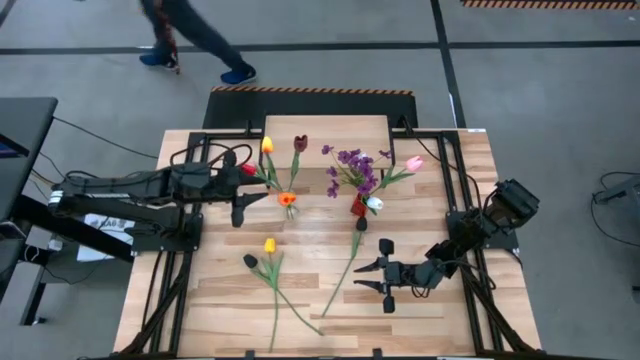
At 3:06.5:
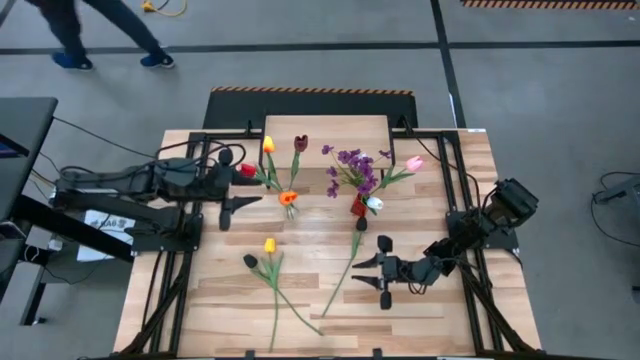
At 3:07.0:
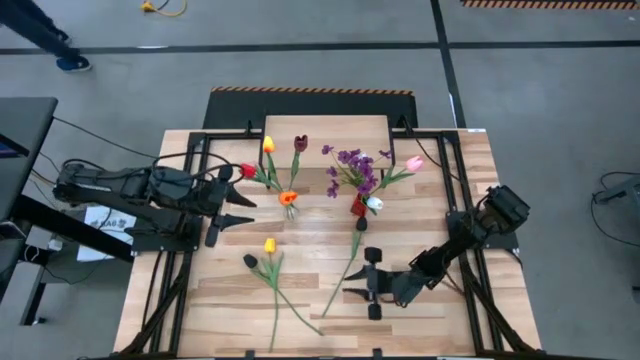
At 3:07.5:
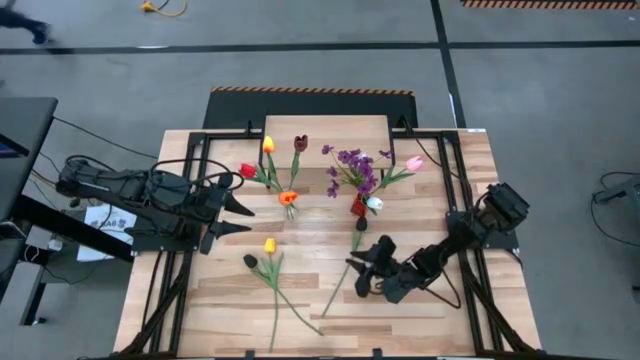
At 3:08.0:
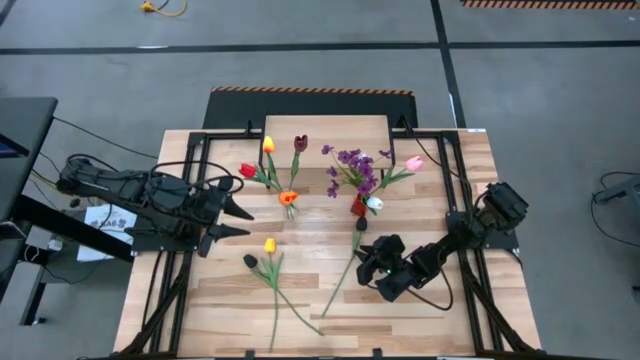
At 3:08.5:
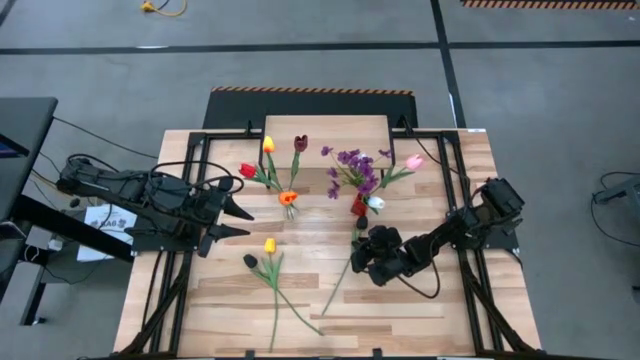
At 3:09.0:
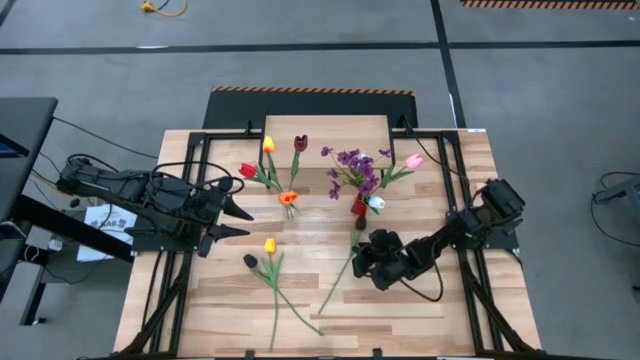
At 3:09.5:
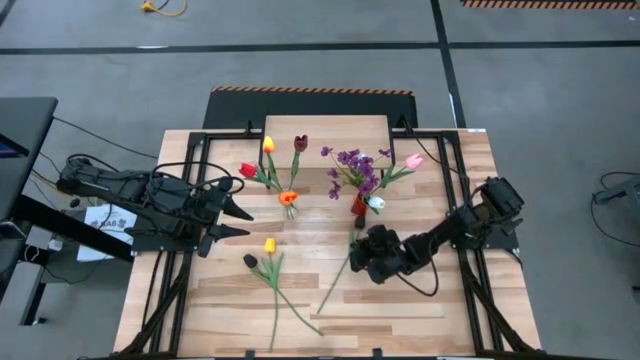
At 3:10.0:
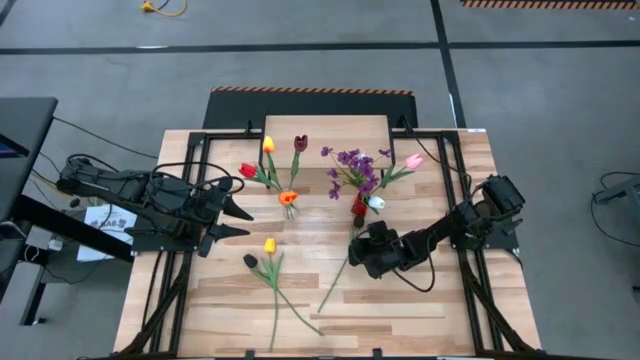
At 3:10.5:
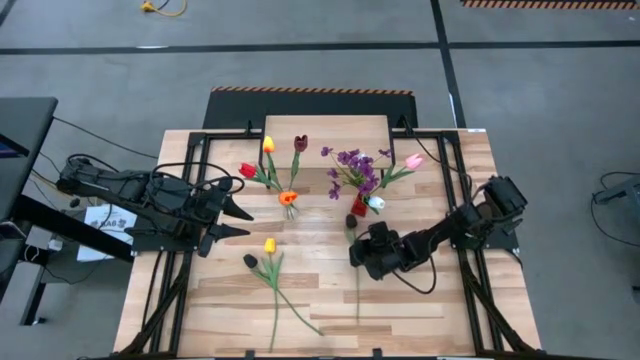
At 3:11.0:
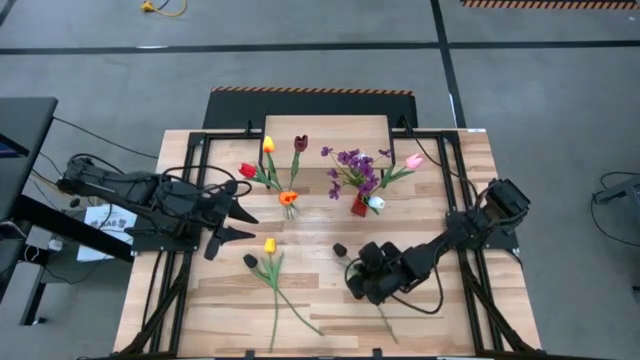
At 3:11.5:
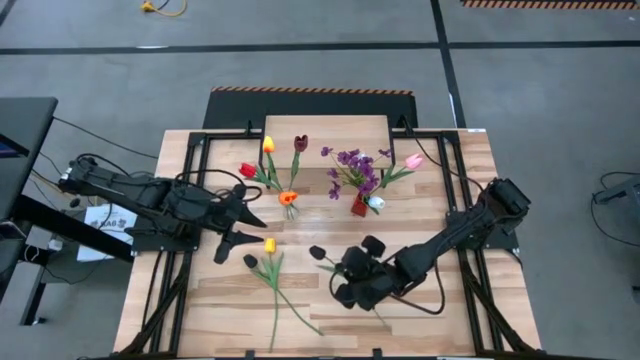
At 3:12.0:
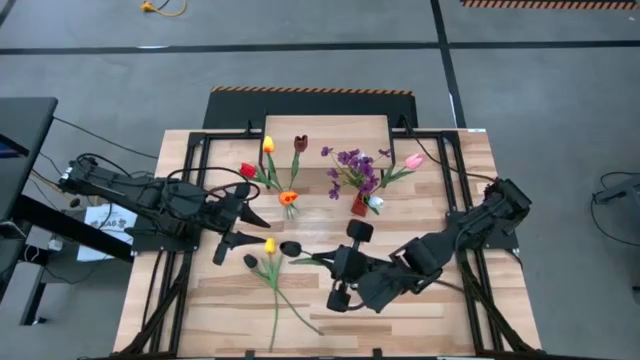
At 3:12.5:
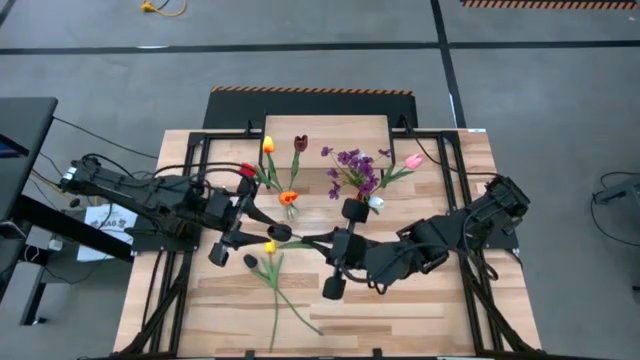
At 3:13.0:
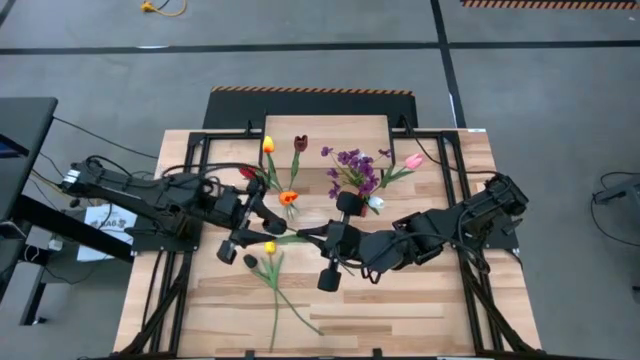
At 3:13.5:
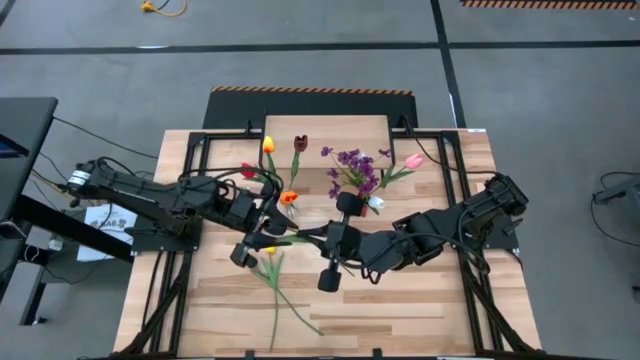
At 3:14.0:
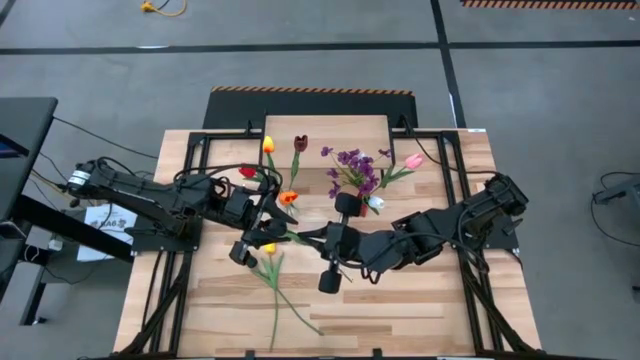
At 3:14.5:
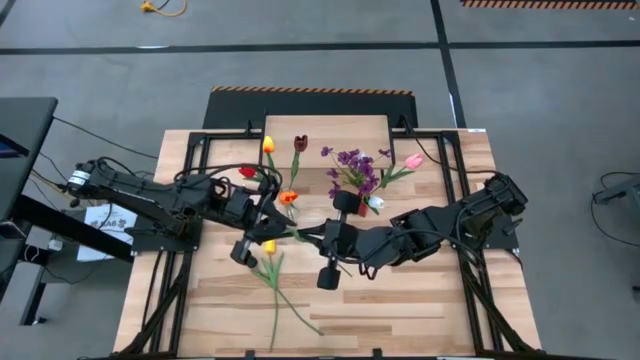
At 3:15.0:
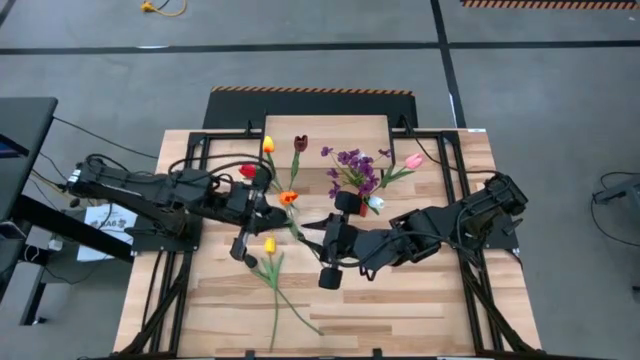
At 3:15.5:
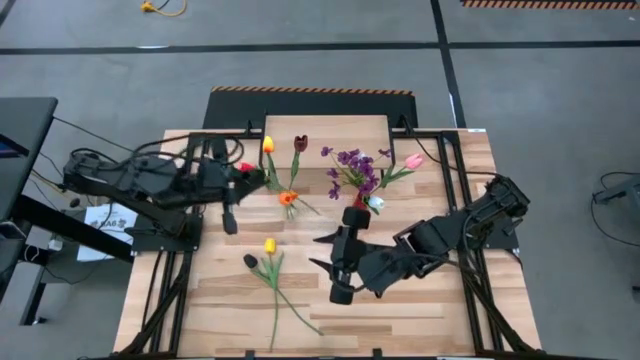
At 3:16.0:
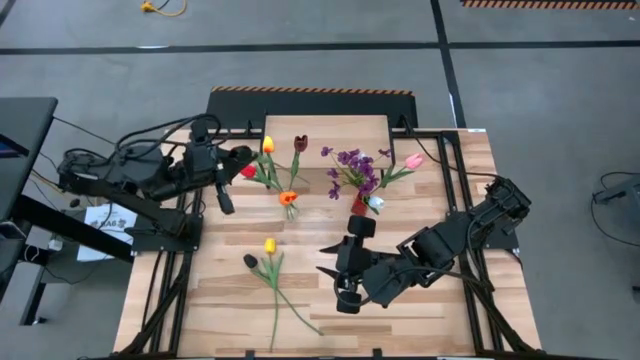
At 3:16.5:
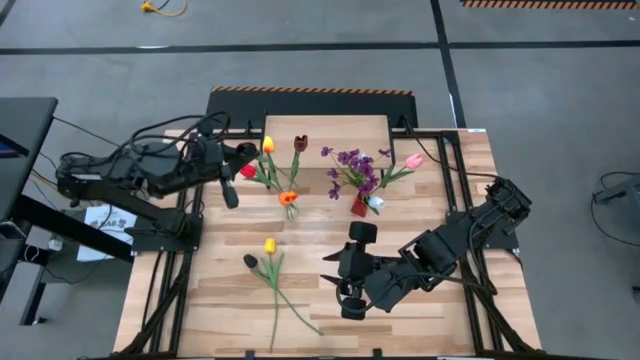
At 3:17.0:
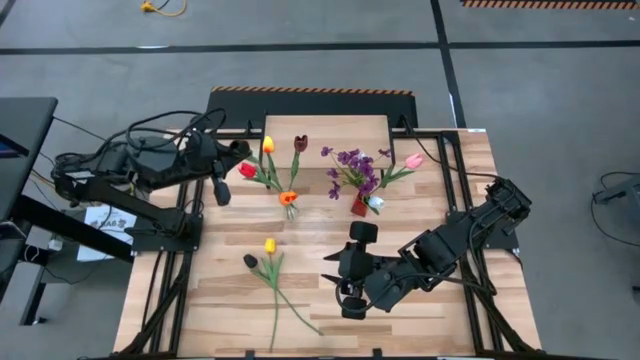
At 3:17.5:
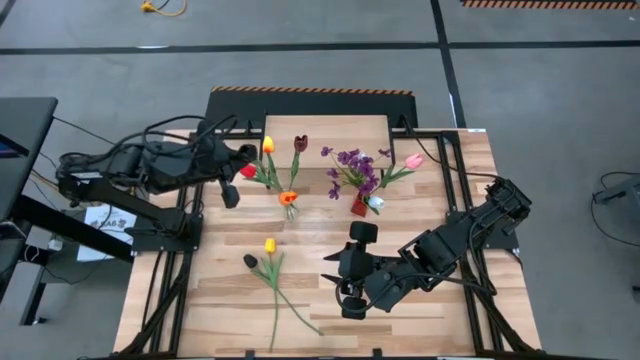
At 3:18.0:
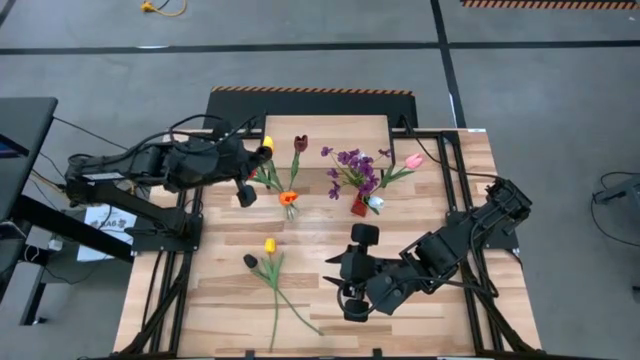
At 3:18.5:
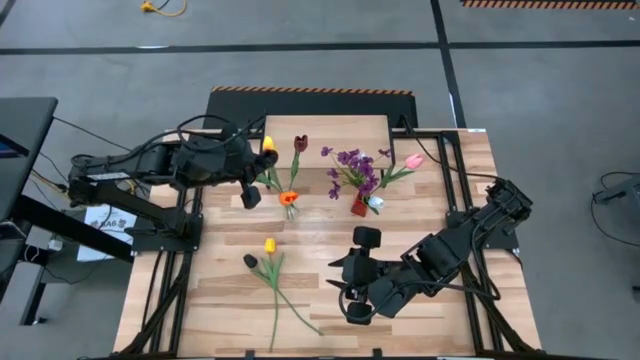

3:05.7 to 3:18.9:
Task: Pick and place flowers into a vace then onto a shelf
Put the right black flower into the transparent flower vase

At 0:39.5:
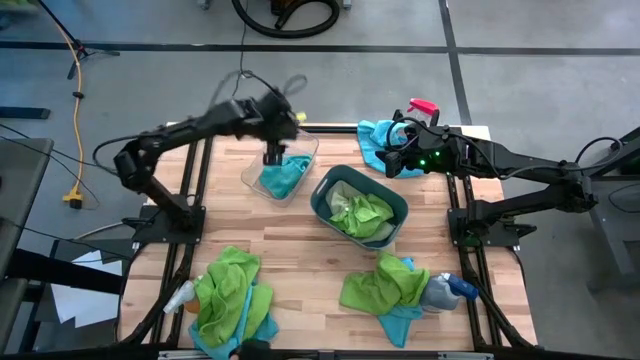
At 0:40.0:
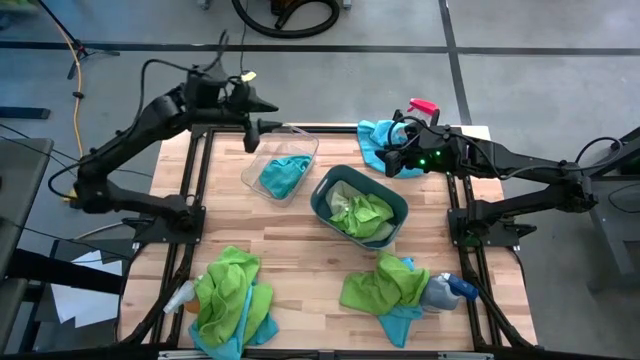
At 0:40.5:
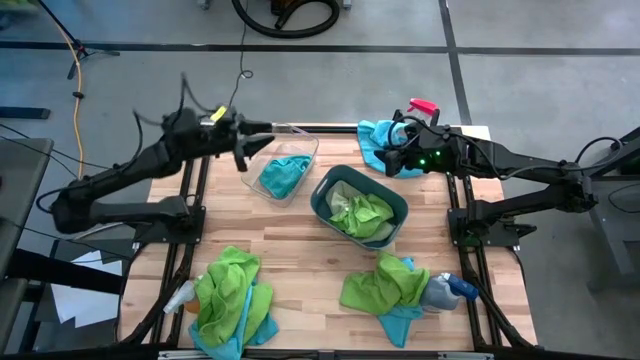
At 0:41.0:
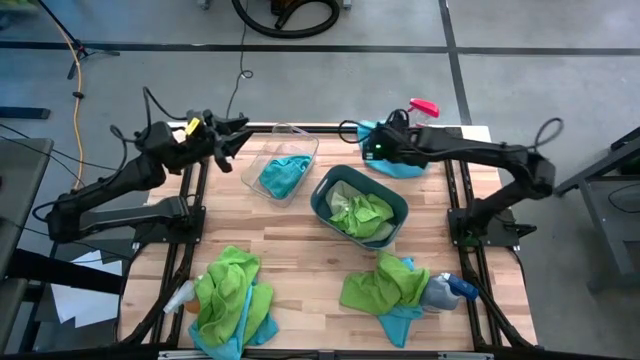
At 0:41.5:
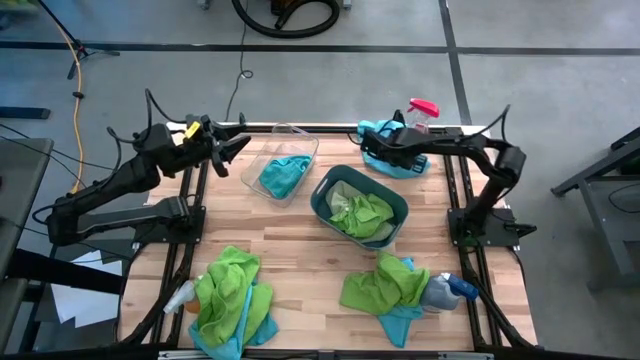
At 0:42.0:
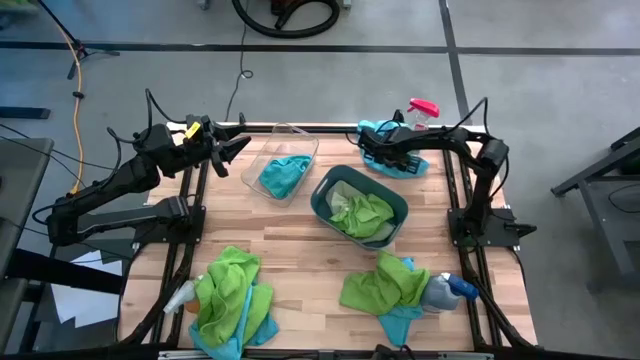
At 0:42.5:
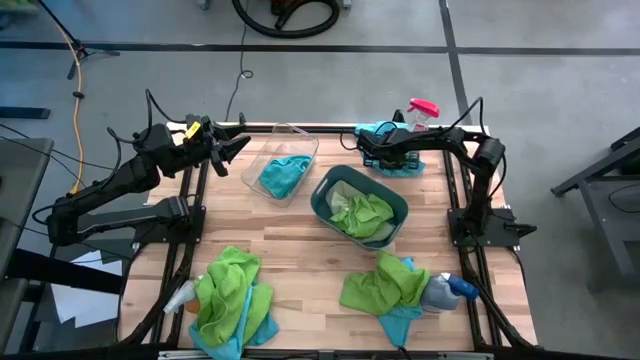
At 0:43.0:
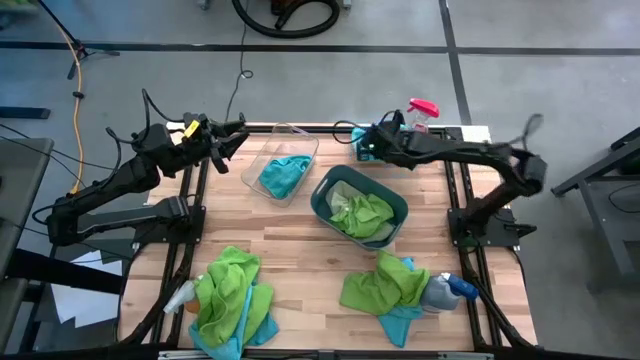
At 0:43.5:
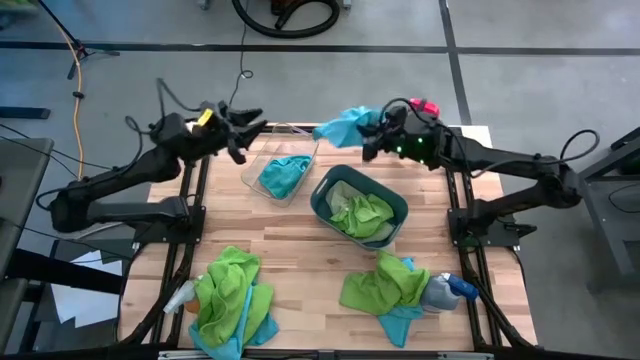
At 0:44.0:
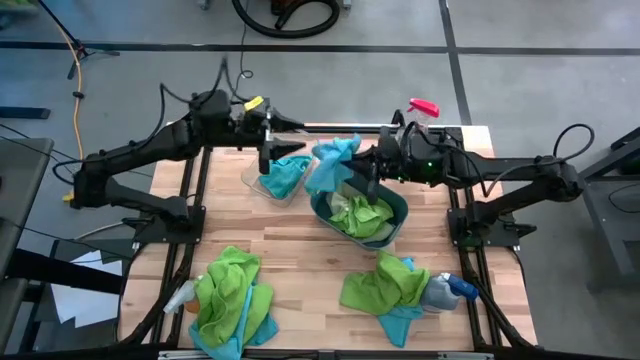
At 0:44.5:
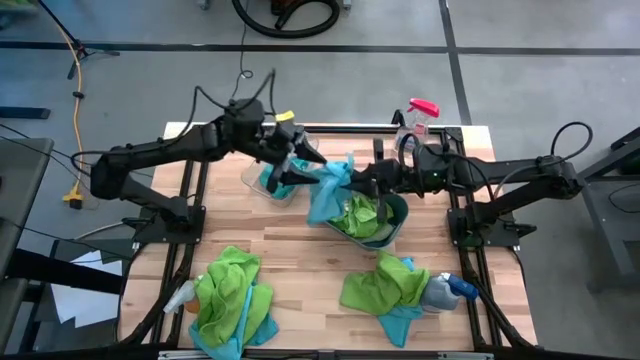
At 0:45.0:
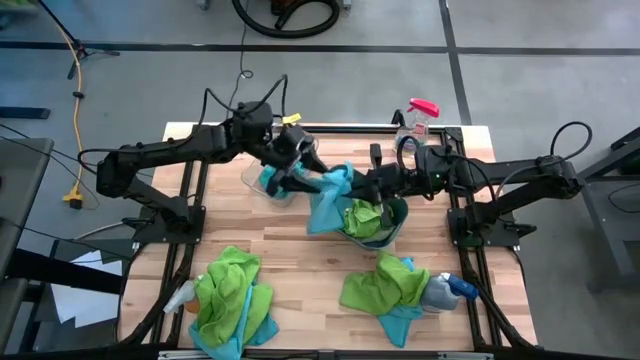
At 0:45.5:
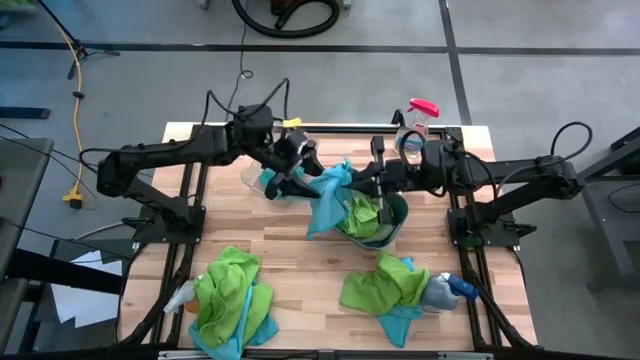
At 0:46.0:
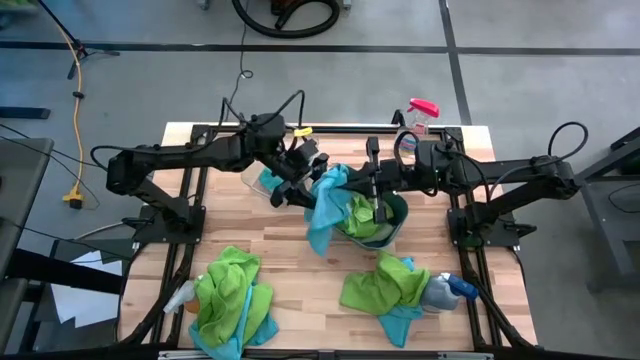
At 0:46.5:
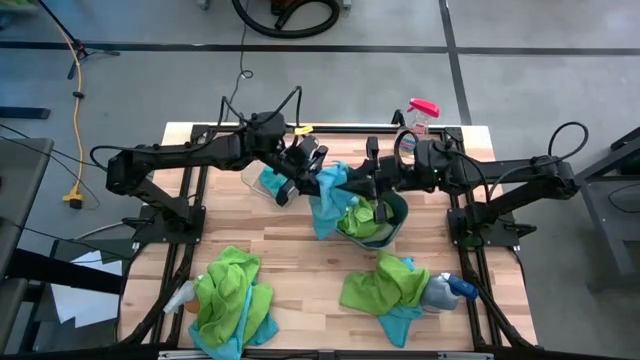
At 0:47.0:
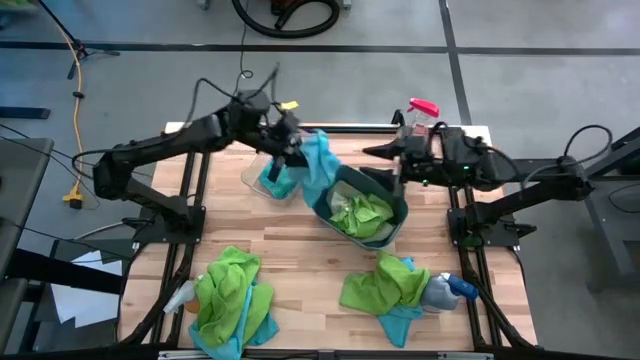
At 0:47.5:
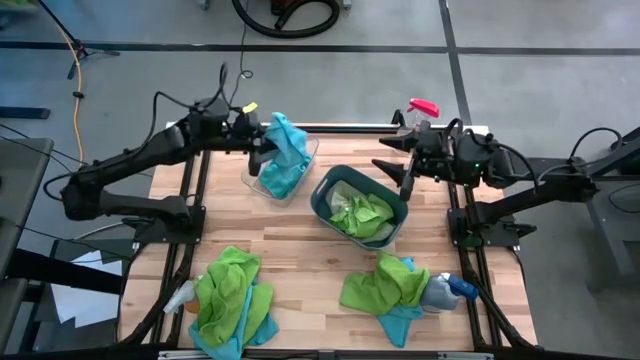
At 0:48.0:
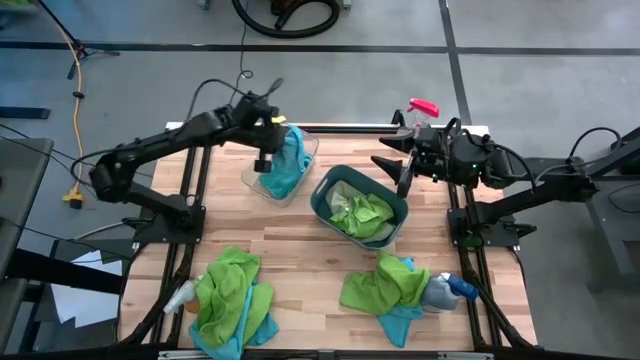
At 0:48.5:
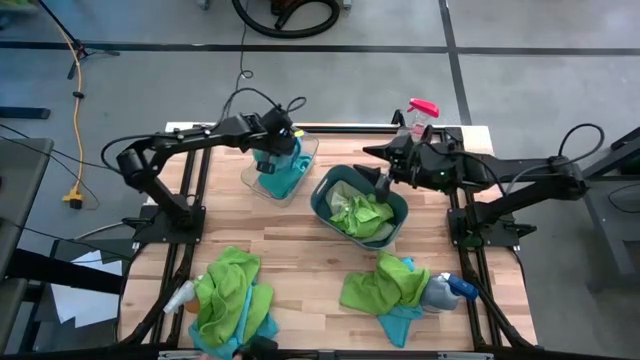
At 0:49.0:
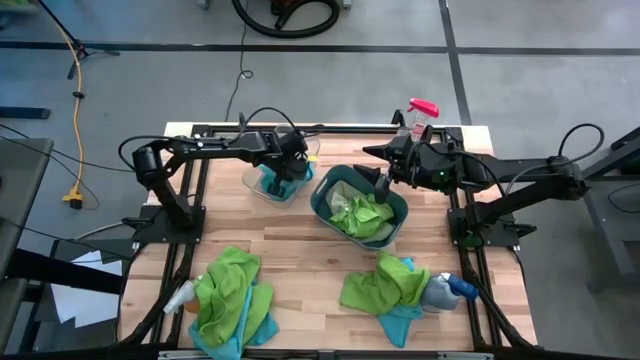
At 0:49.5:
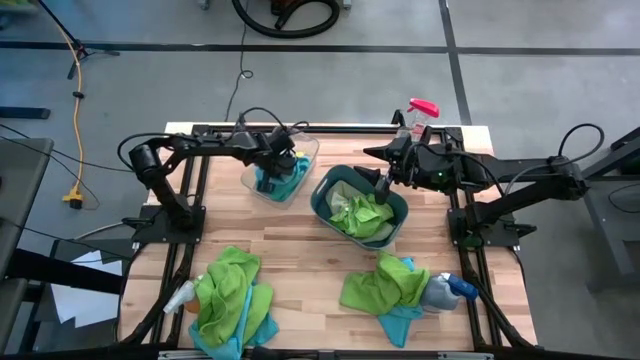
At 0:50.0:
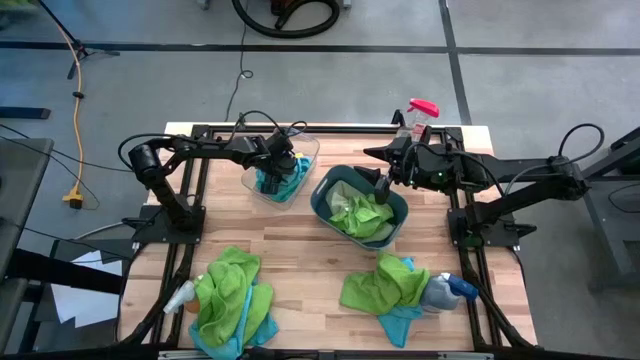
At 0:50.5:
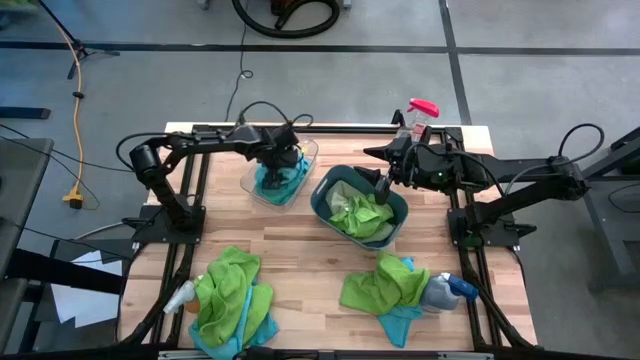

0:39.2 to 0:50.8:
Task: Sort microfiber towel by color & place in baskets
Put the blue microfiber towel into the transparent bin
